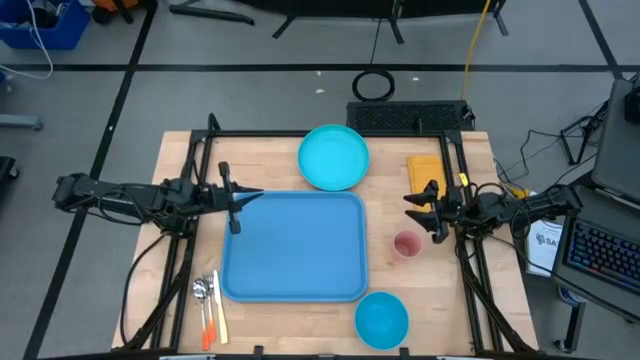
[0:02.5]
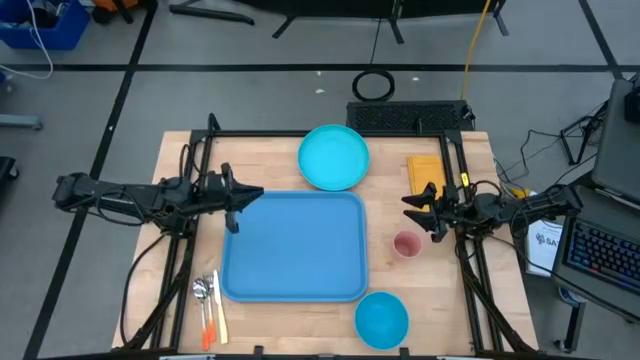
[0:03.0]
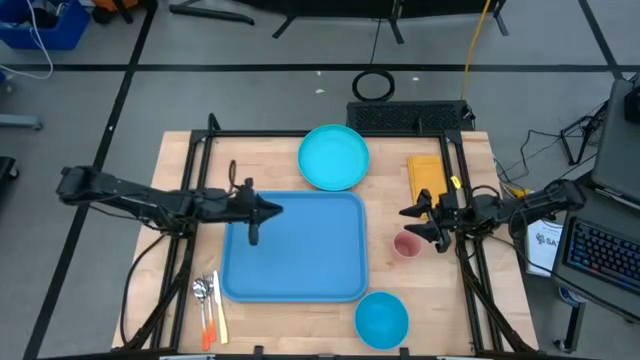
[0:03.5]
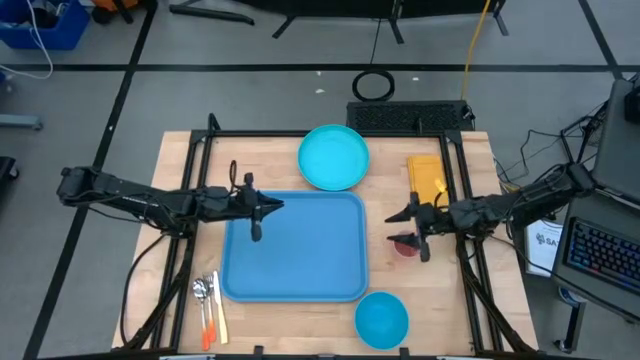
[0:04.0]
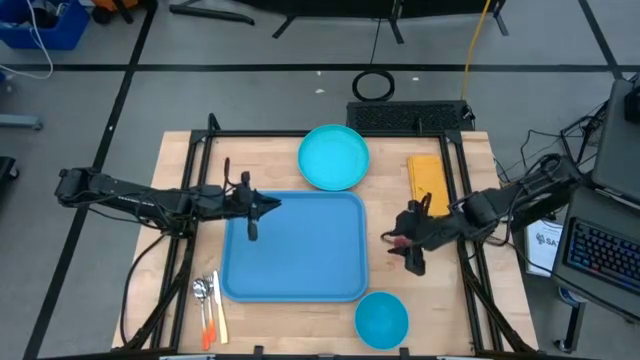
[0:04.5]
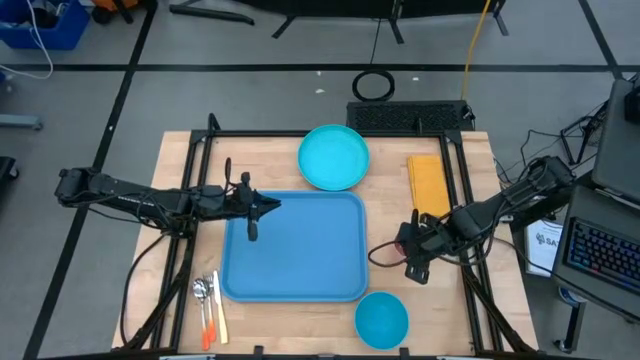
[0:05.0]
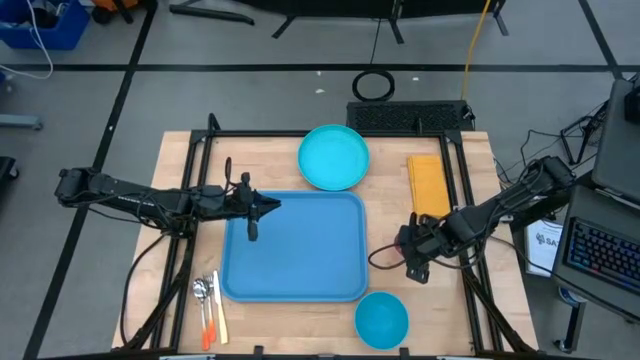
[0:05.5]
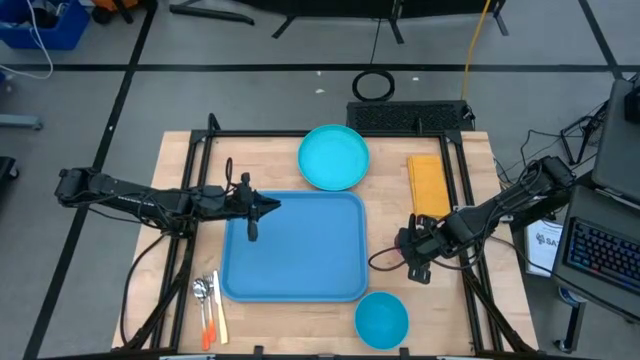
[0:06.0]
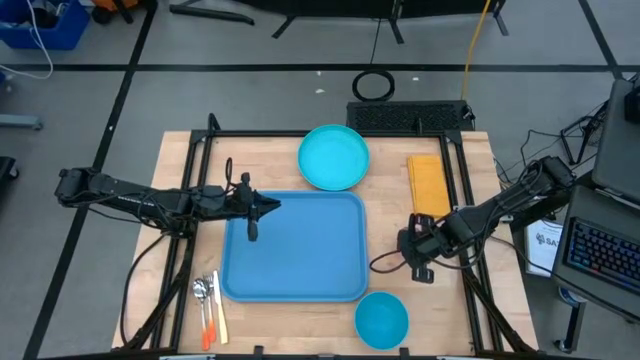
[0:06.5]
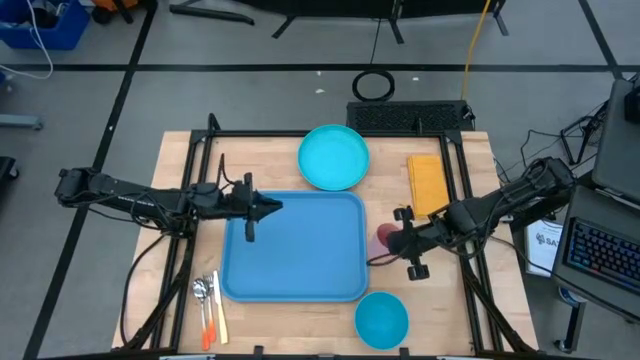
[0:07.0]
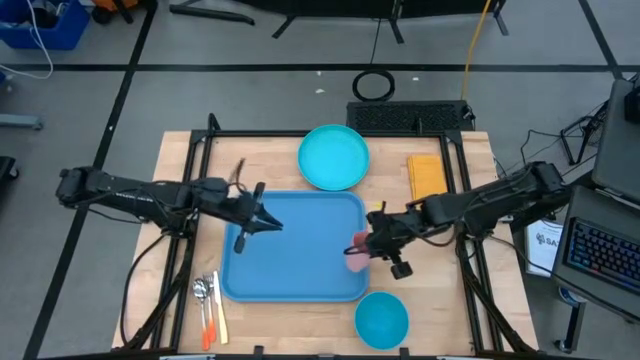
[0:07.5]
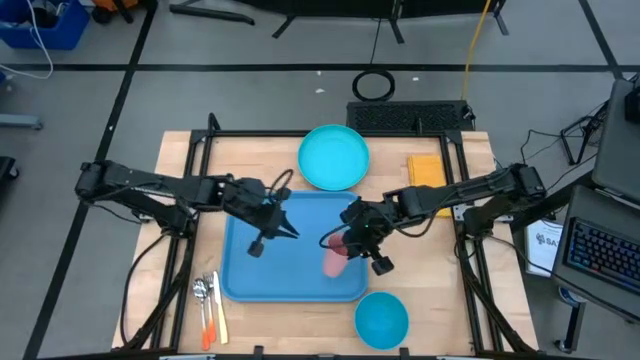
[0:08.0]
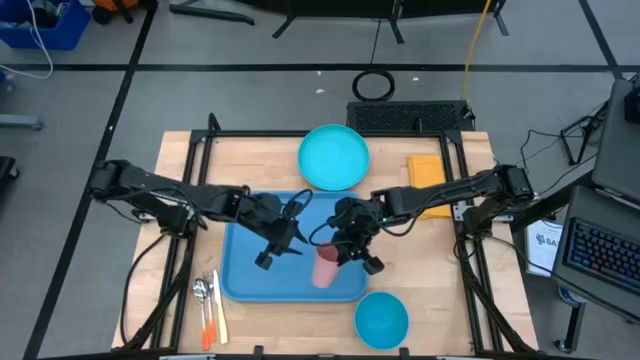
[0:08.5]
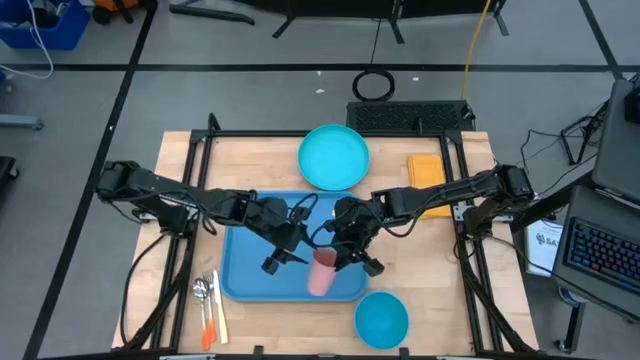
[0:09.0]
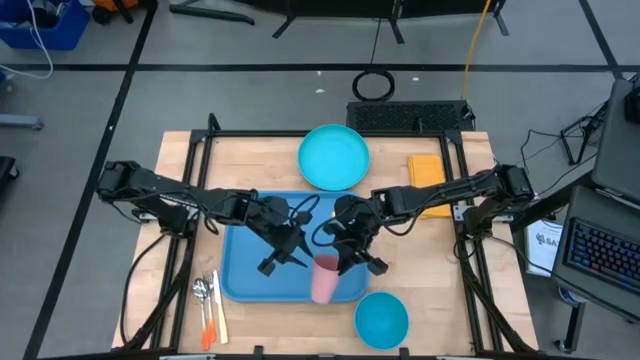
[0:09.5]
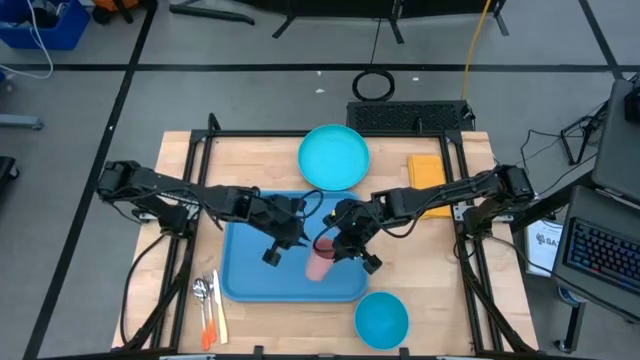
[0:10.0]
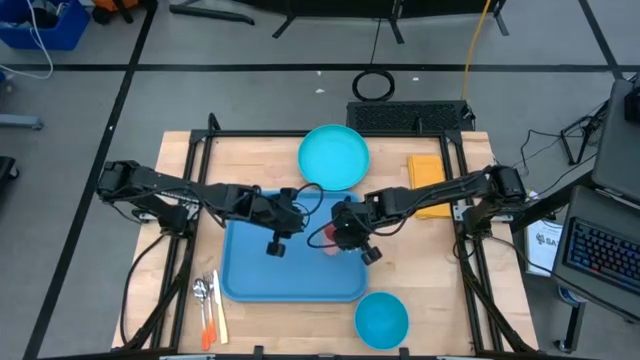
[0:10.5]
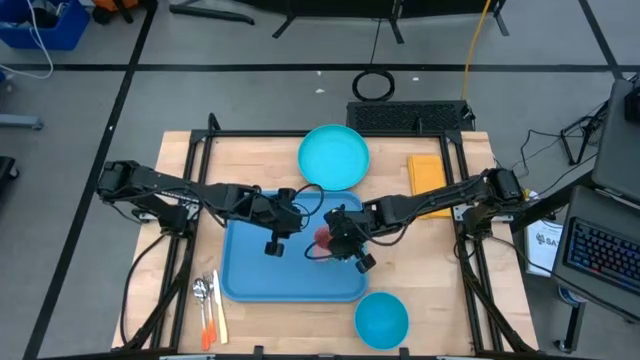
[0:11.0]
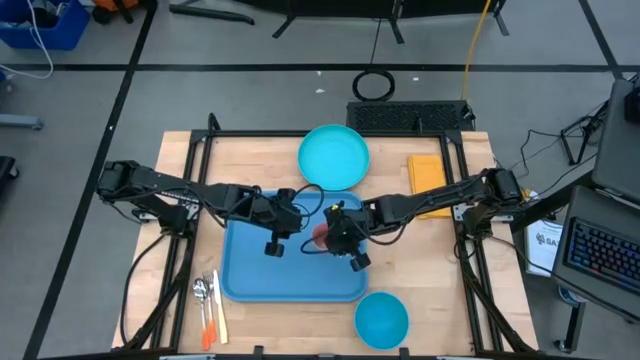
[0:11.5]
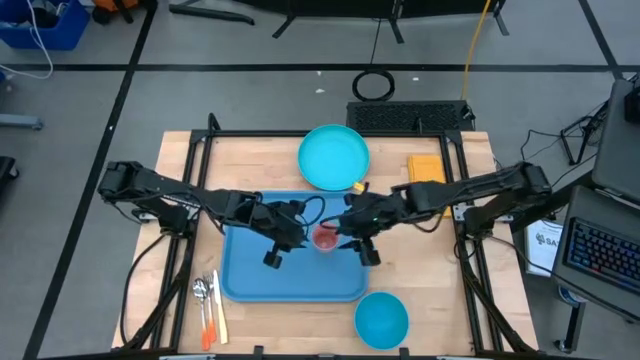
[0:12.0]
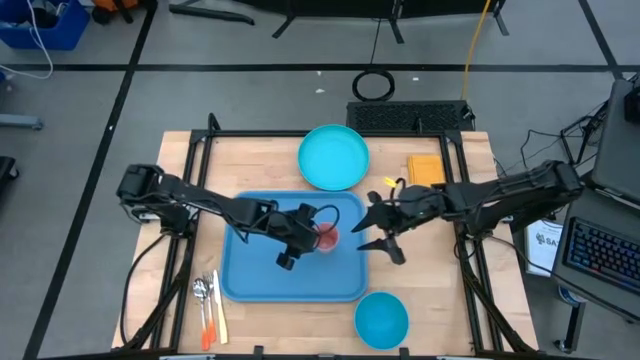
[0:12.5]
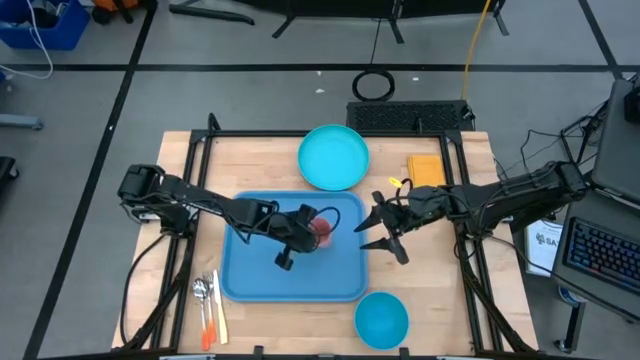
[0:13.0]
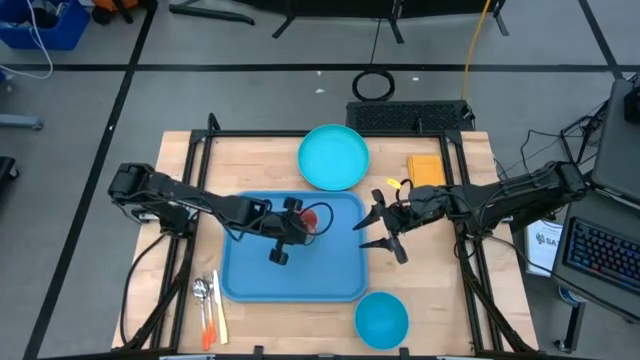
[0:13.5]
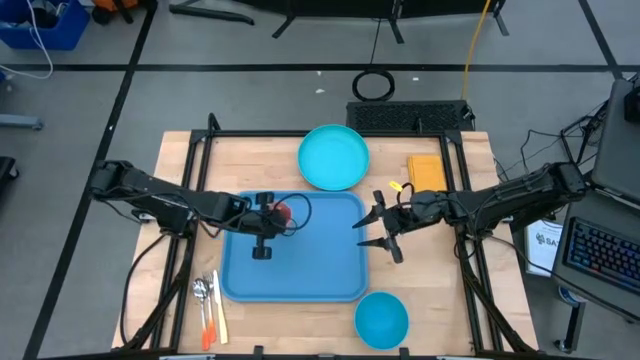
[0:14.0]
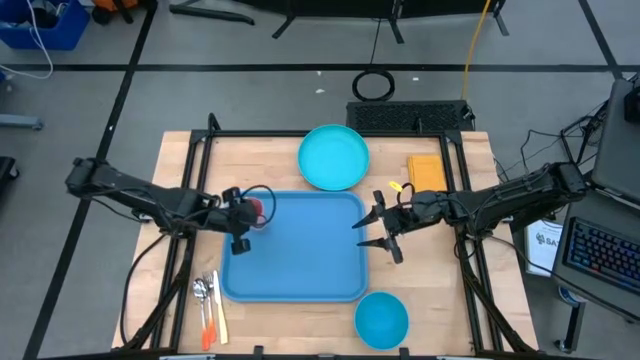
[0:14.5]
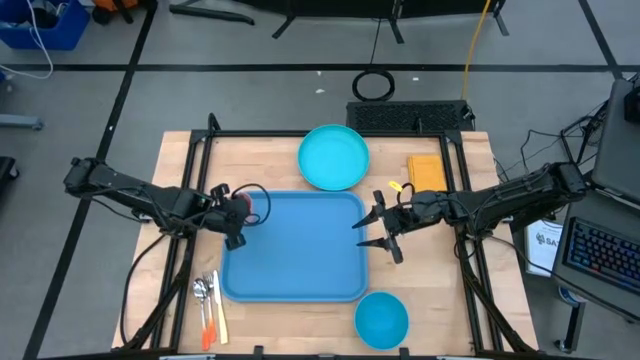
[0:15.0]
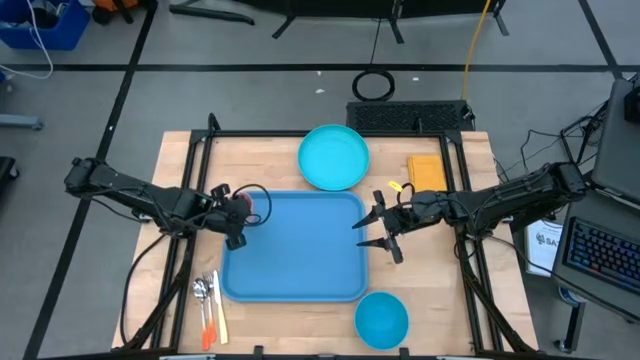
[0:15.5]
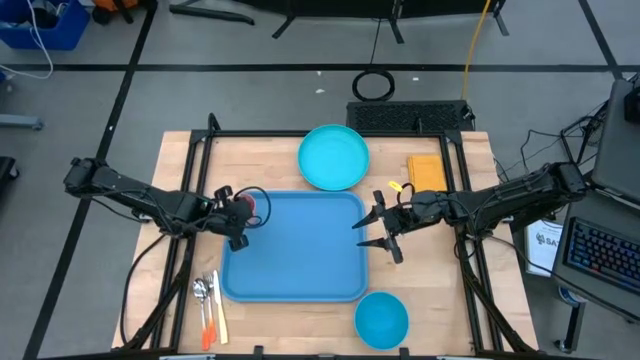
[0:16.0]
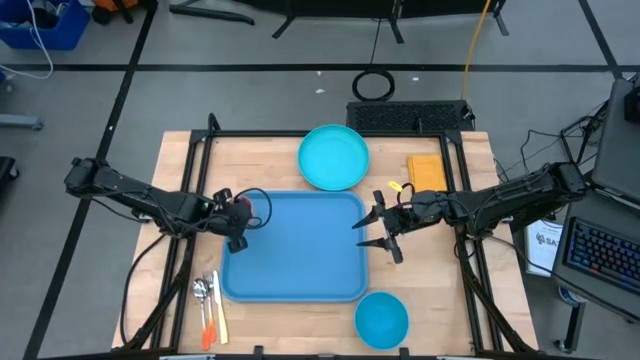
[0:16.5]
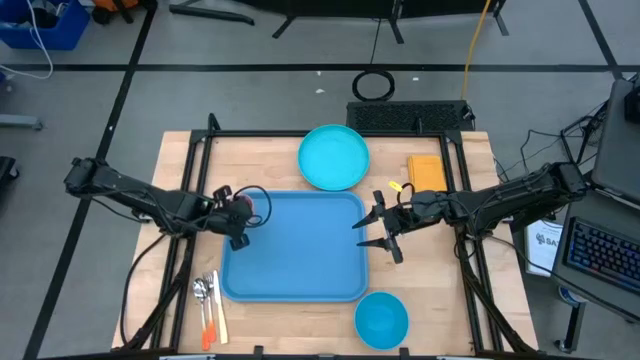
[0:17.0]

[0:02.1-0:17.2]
Task: Set up tray
Put the pink cup on the top right of the blue serving tray

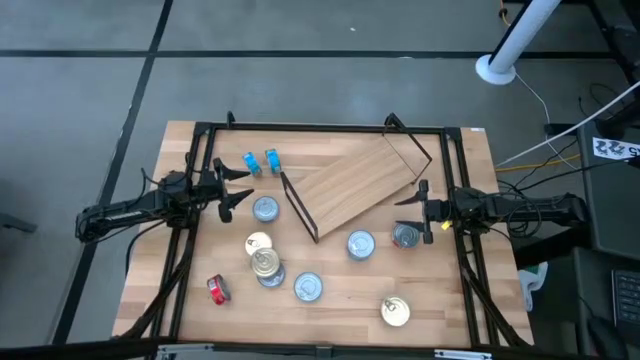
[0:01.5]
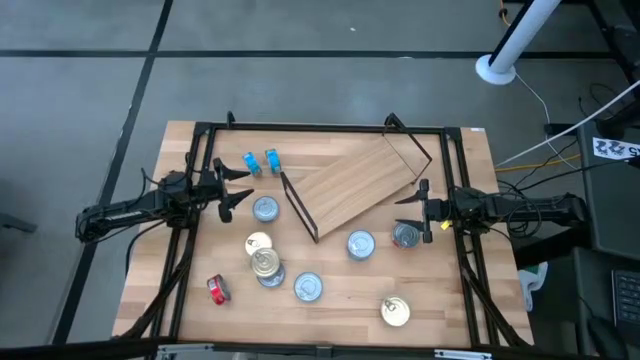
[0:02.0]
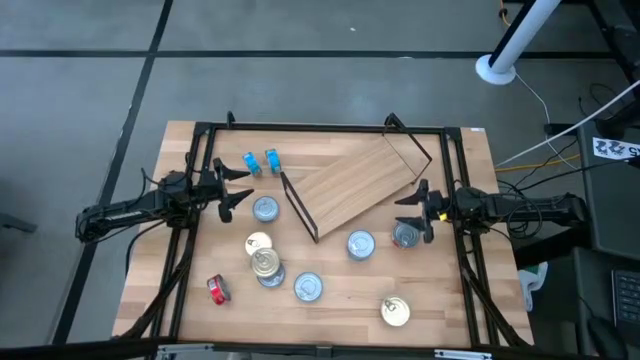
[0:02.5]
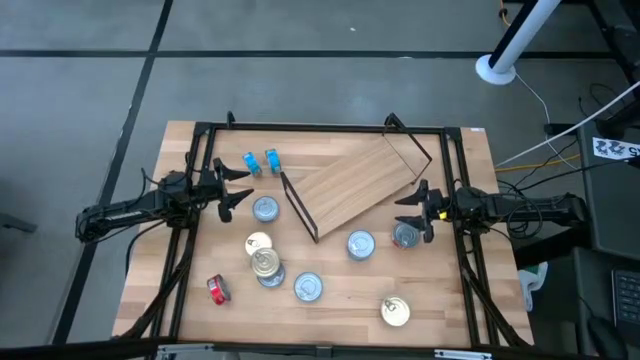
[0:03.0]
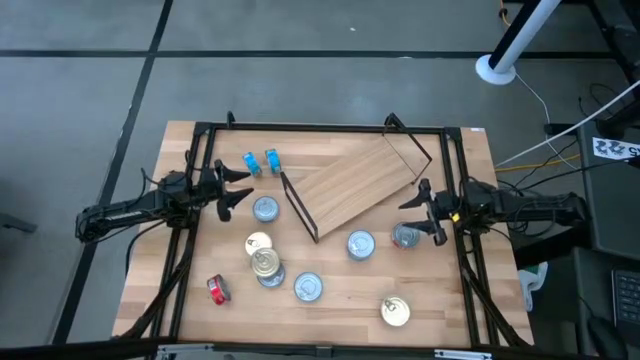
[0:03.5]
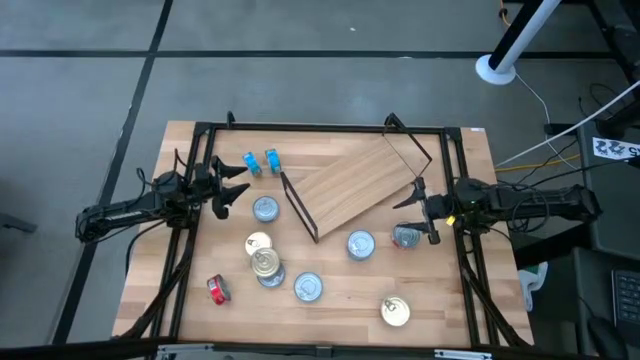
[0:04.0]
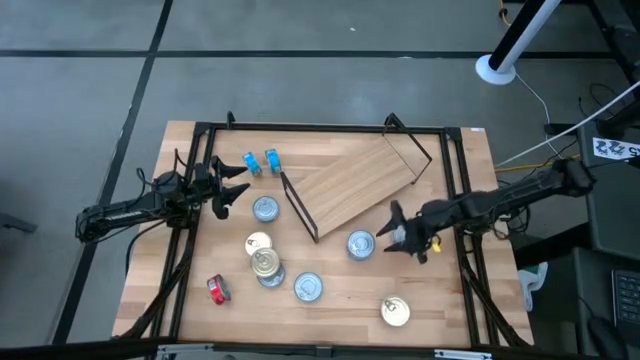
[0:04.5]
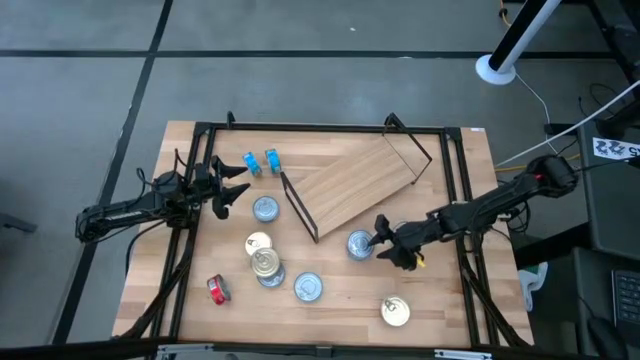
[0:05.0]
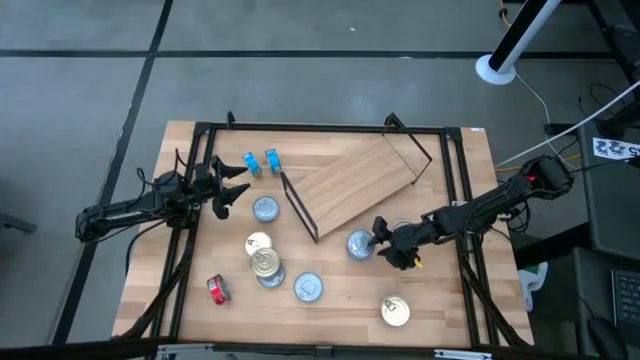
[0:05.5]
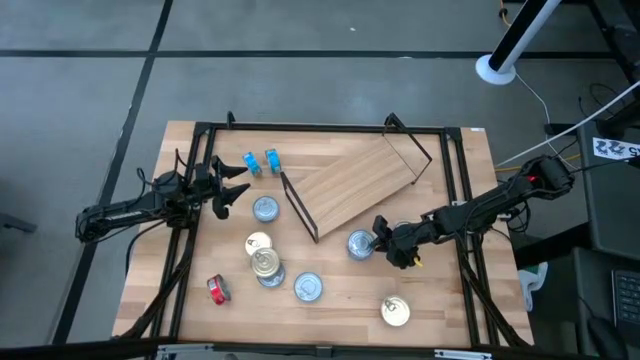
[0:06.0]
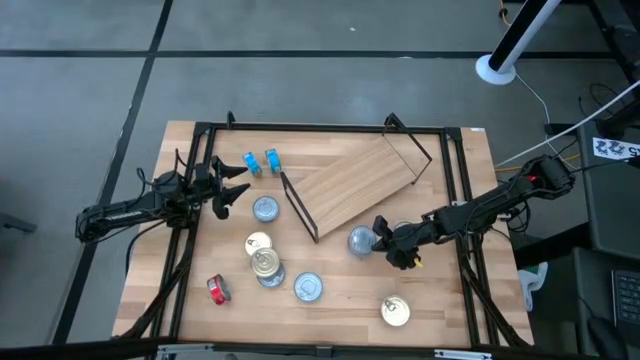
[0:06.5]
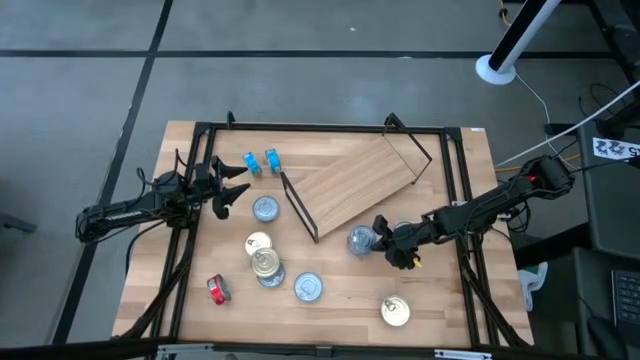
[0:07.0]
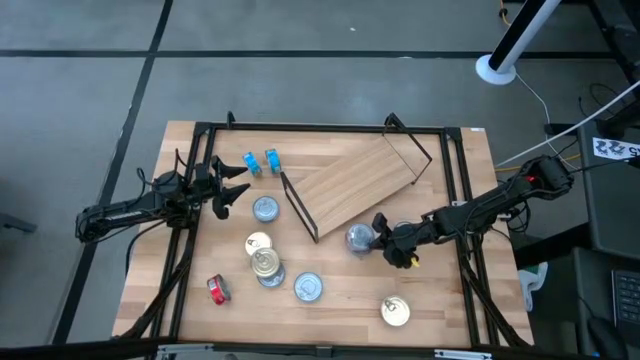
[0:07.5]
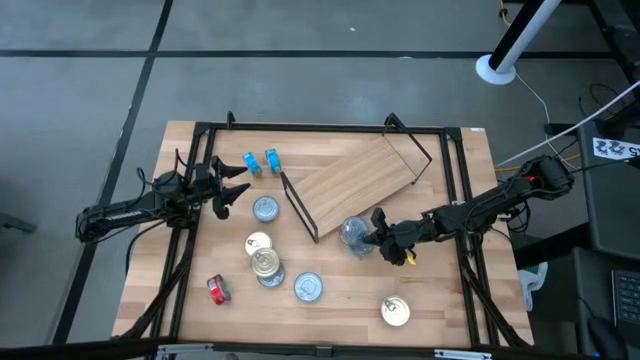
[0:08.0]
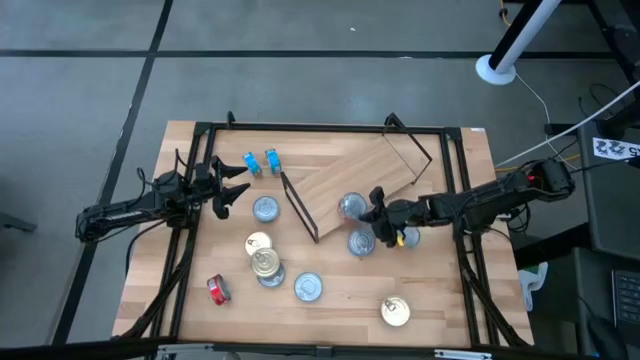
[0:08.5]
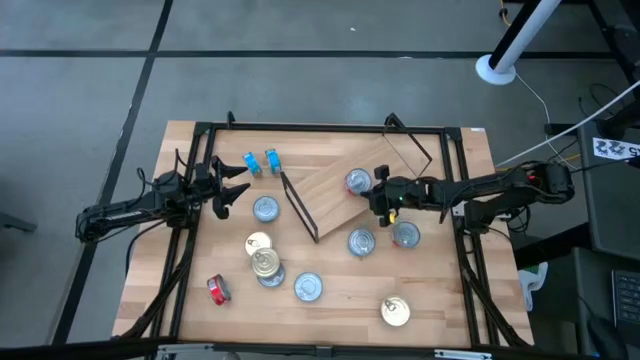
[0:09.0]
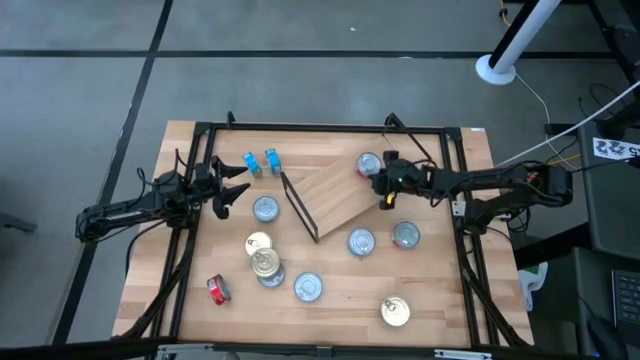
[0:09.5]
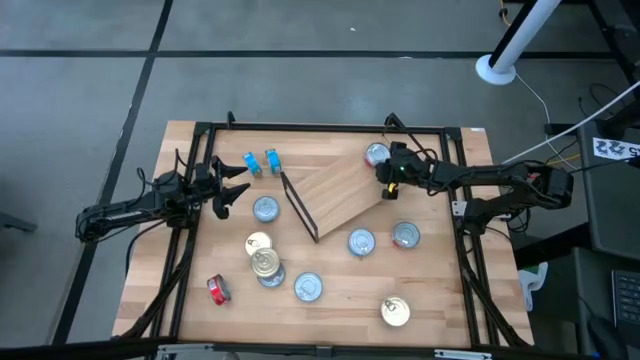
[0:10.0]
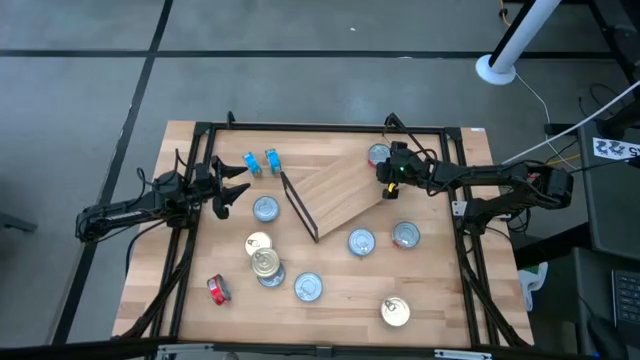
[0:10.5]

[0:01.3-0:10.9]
Task: Stack canned seafood by type on shelf
Put the middle red tuna can on the shelf
